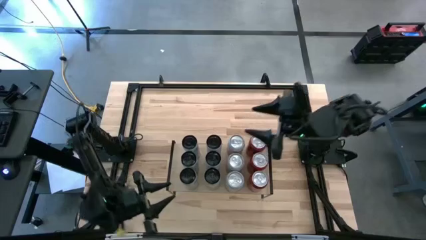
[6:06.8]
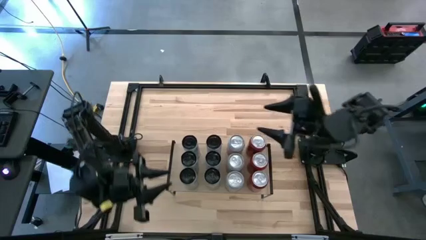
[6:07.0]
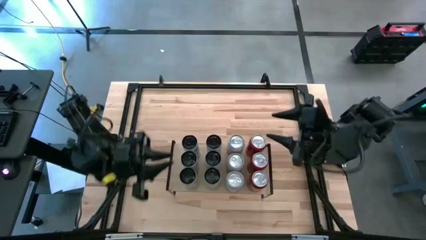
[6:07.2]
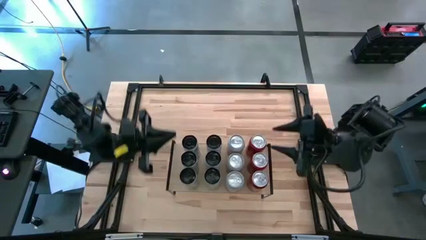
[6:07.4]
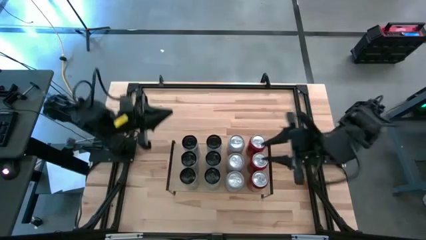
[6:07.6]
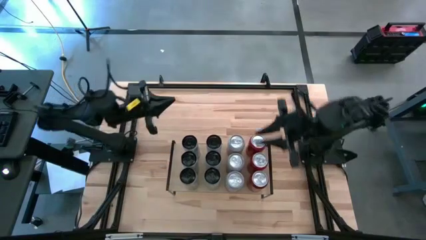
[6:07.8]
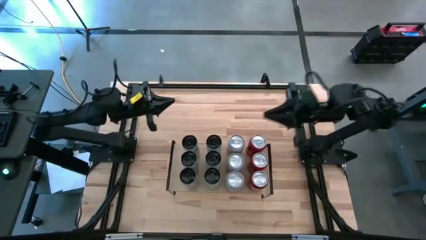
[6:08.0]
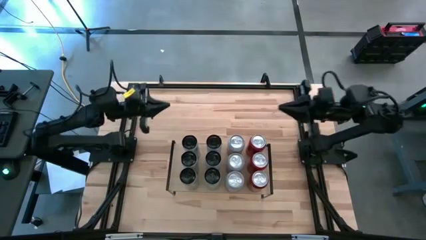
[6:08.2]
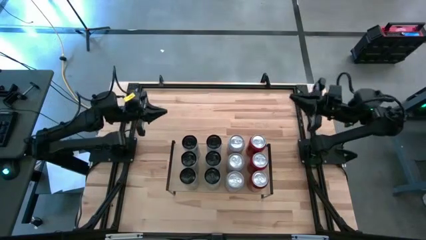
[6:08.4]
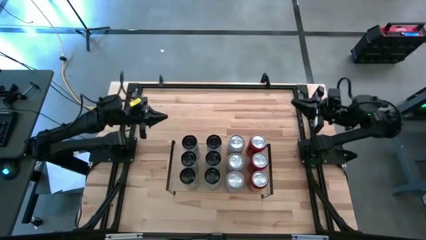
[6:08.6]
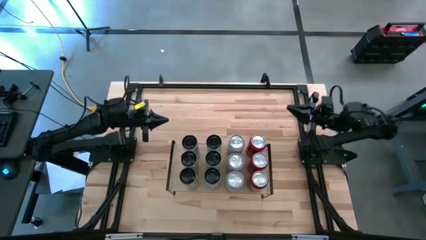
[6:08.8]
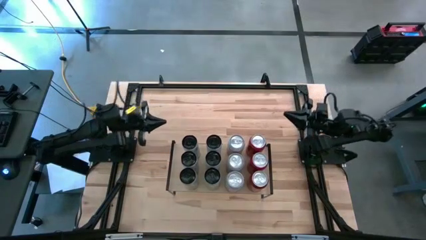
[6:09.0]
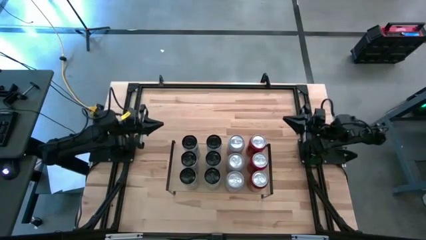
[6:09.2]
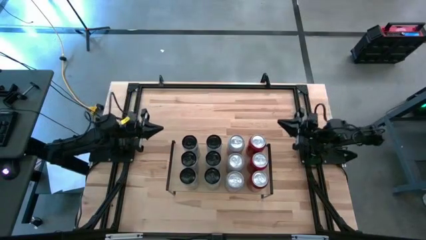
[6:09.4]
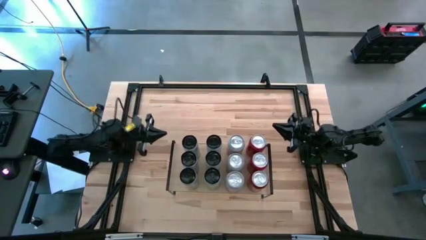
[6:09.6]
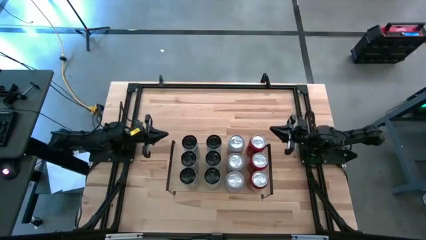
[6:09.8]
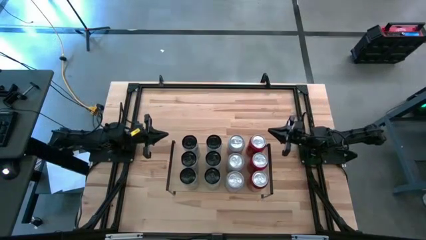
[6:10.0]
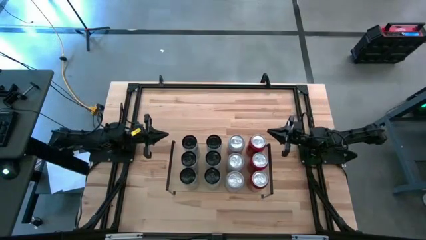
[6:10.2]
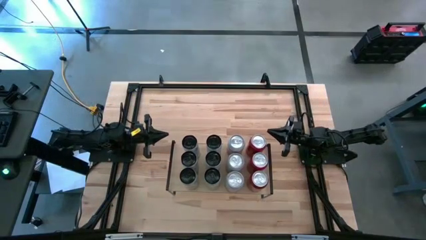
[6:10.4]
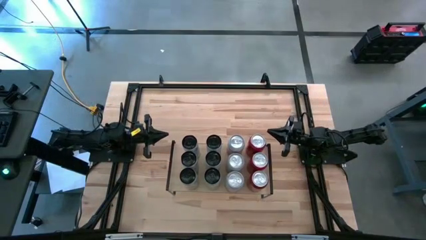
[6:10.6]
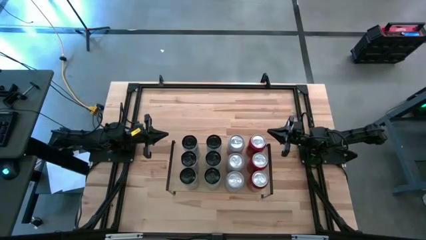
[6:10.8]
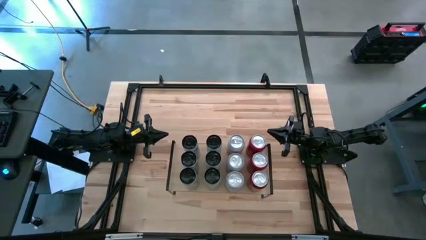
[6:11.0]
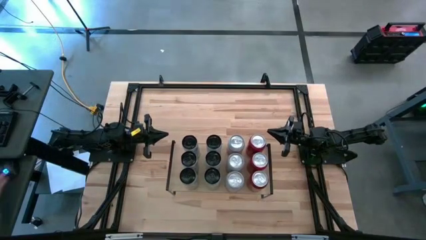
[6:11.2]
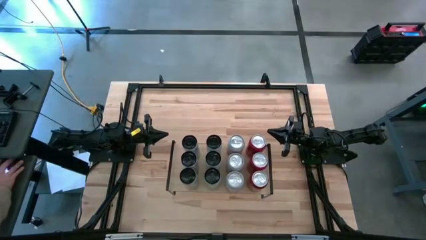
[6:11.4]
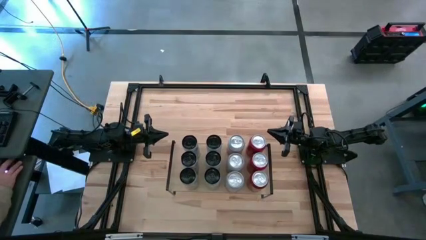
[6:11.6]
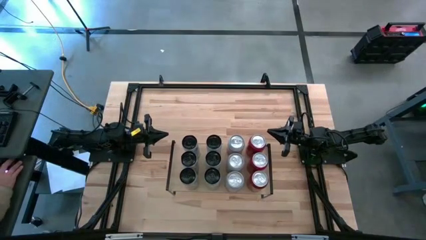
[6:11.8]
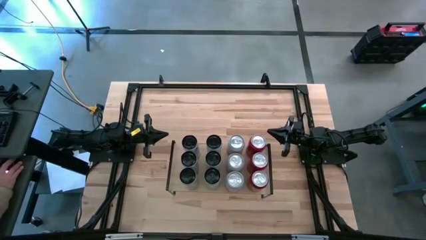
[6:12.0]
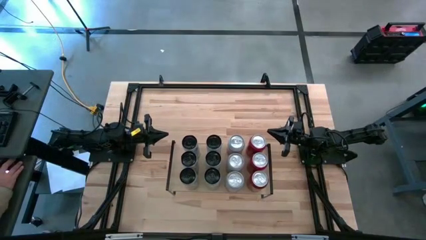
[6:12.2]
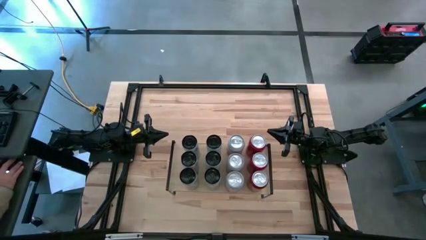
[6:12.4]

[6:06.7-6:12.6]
Task: Place canned beverage on shelf
Return to Home Position

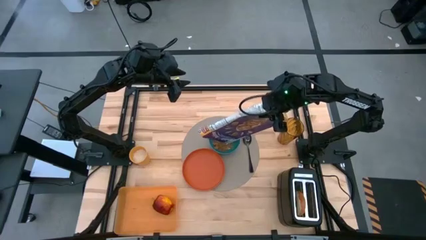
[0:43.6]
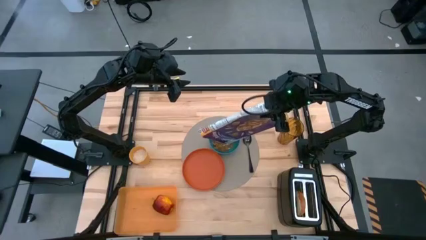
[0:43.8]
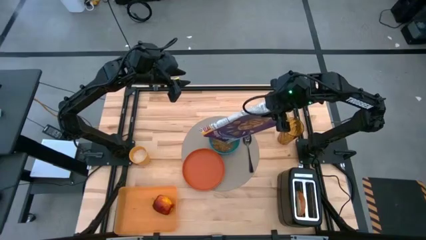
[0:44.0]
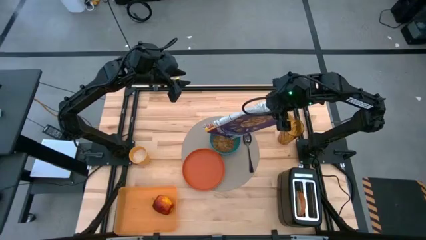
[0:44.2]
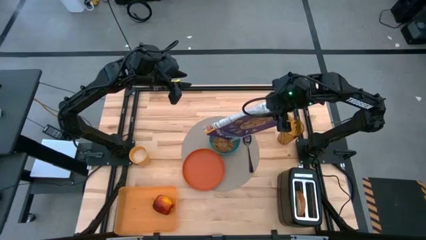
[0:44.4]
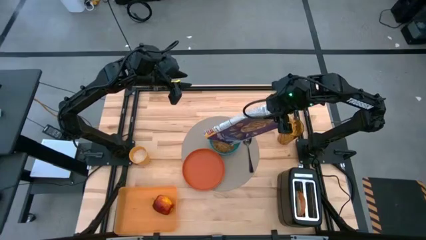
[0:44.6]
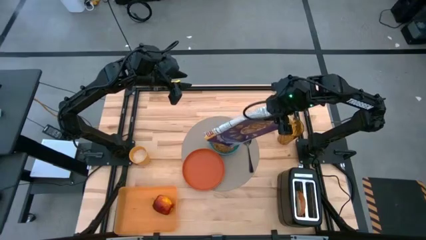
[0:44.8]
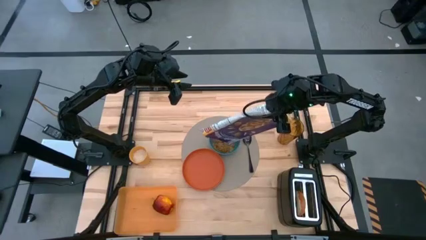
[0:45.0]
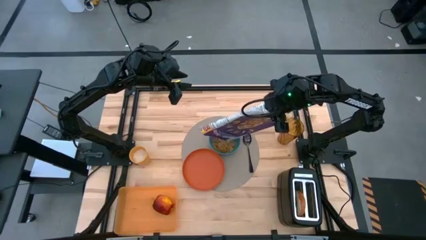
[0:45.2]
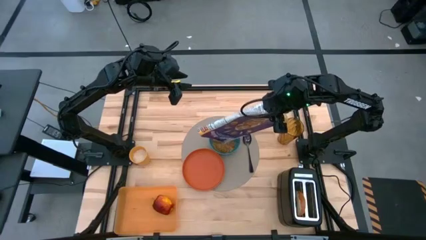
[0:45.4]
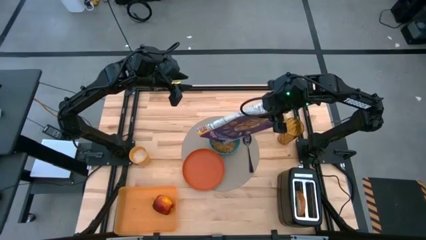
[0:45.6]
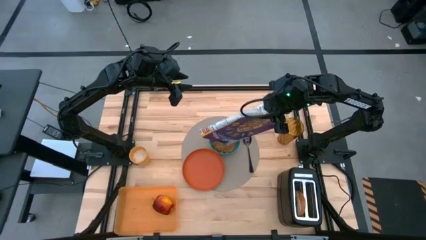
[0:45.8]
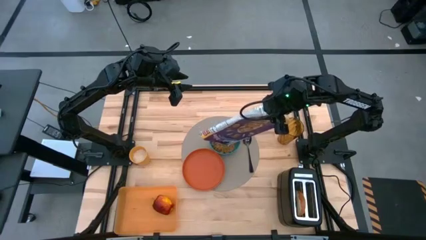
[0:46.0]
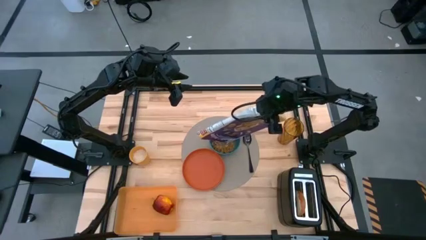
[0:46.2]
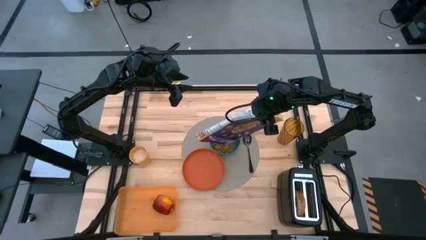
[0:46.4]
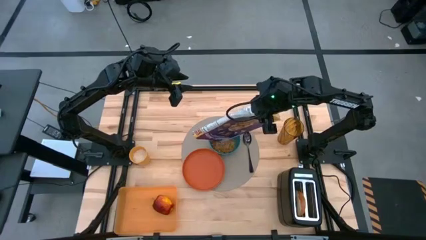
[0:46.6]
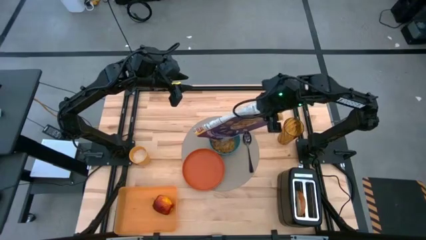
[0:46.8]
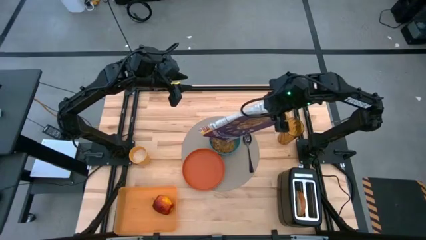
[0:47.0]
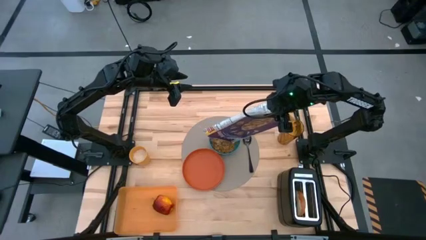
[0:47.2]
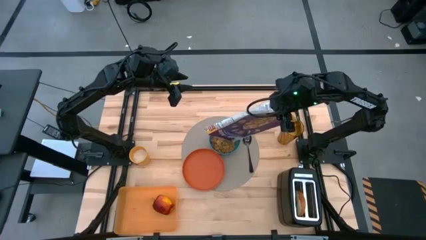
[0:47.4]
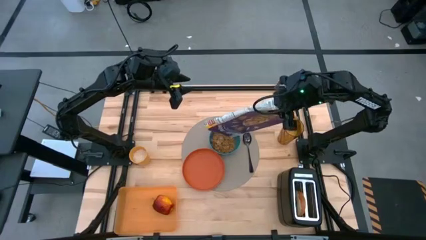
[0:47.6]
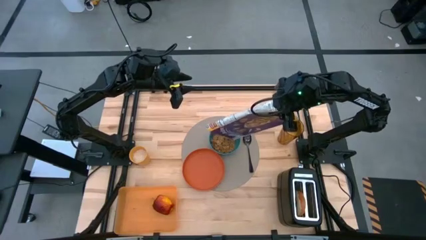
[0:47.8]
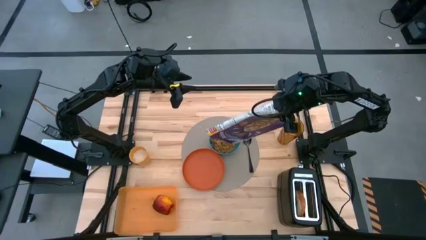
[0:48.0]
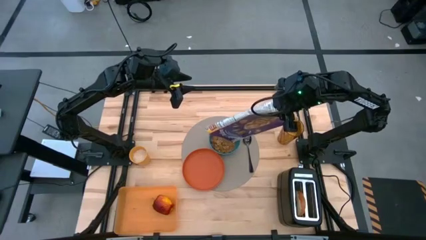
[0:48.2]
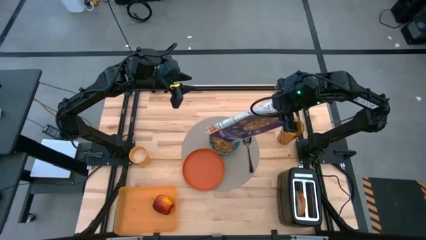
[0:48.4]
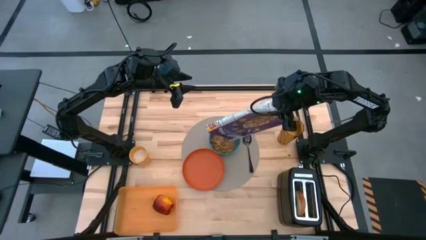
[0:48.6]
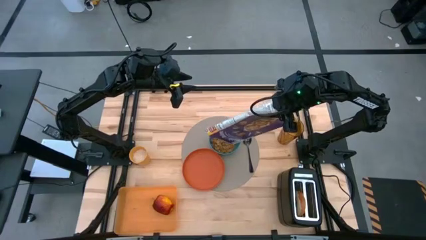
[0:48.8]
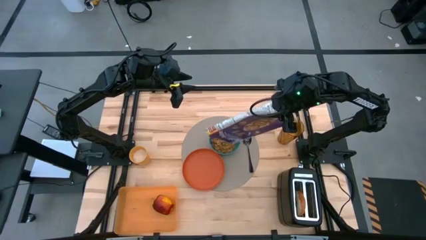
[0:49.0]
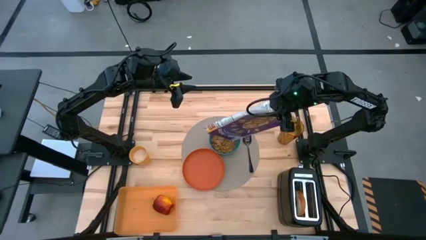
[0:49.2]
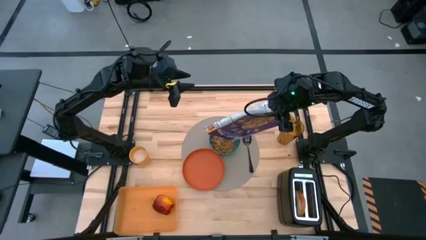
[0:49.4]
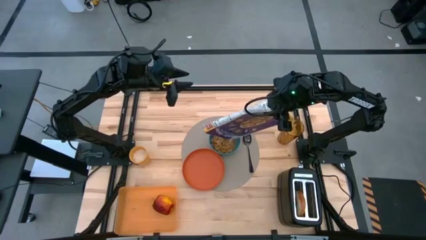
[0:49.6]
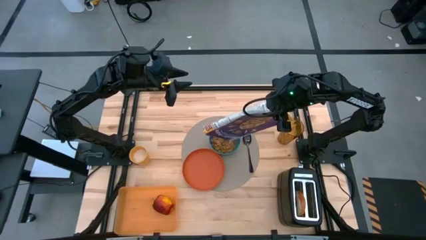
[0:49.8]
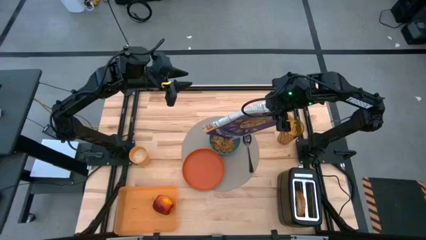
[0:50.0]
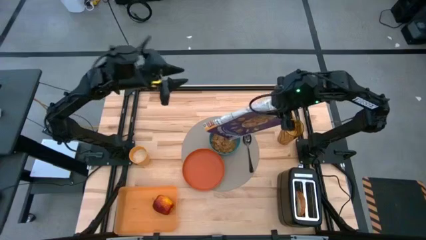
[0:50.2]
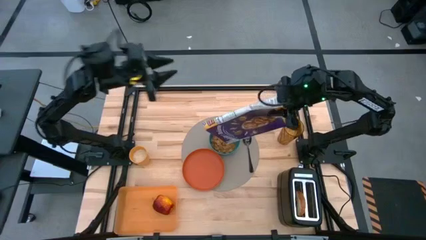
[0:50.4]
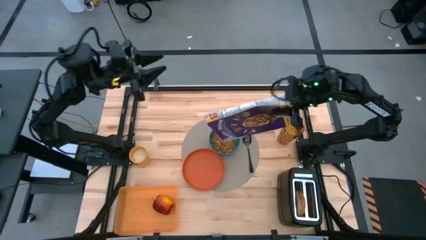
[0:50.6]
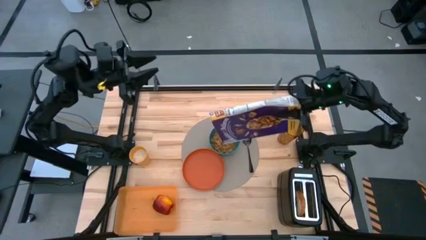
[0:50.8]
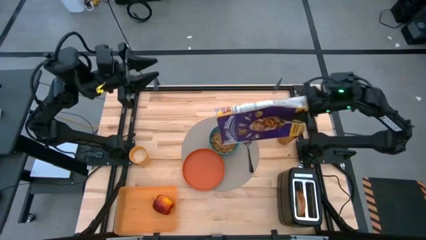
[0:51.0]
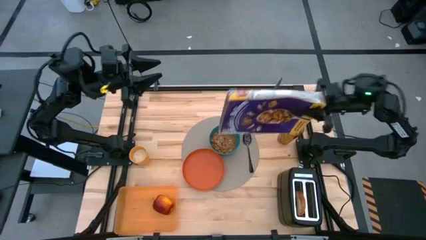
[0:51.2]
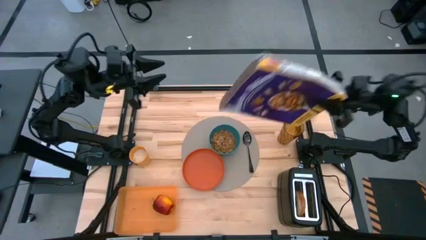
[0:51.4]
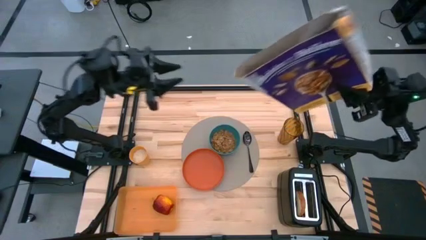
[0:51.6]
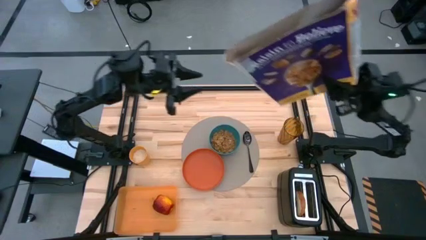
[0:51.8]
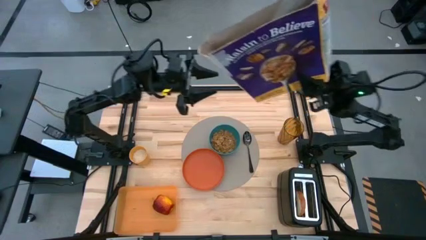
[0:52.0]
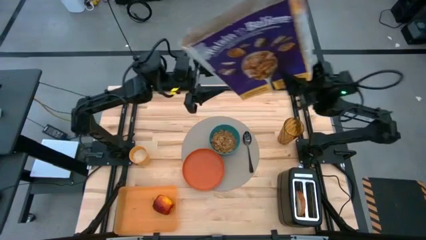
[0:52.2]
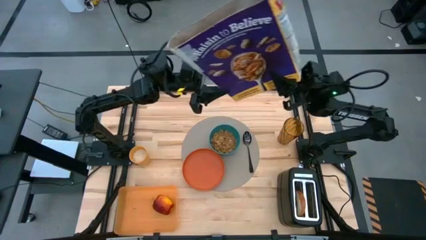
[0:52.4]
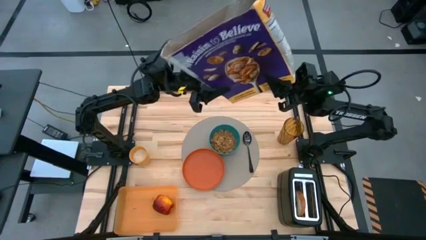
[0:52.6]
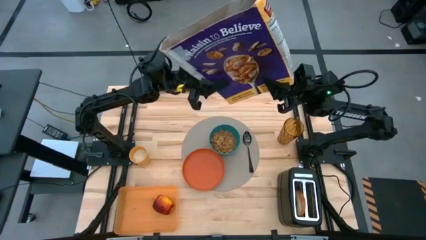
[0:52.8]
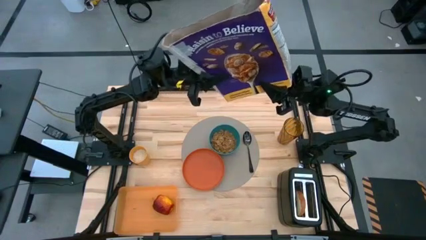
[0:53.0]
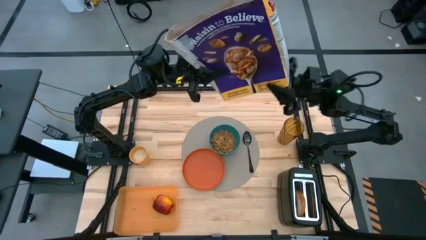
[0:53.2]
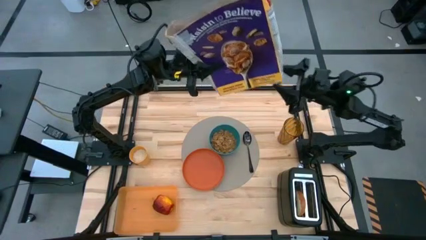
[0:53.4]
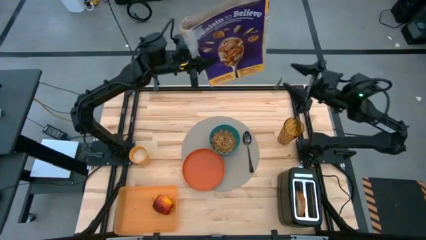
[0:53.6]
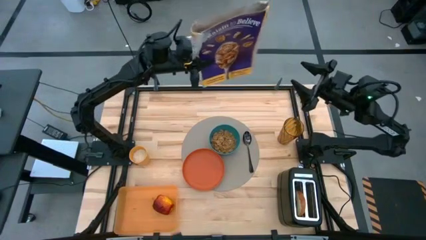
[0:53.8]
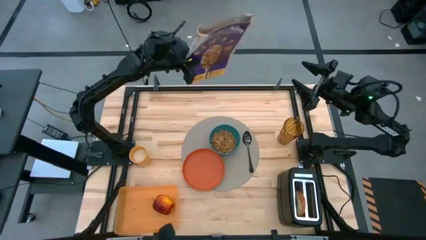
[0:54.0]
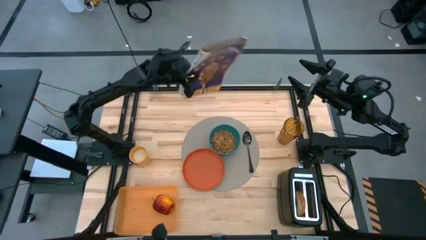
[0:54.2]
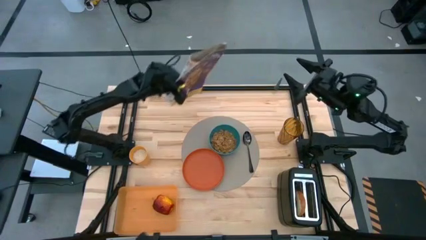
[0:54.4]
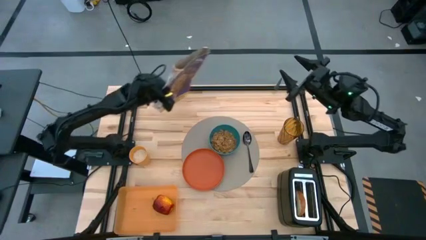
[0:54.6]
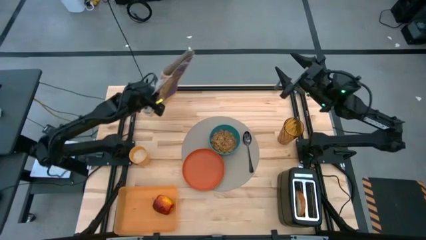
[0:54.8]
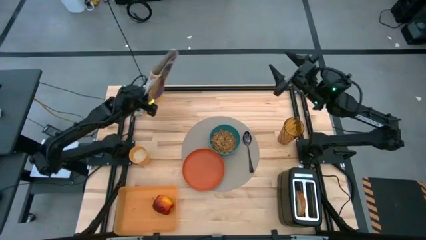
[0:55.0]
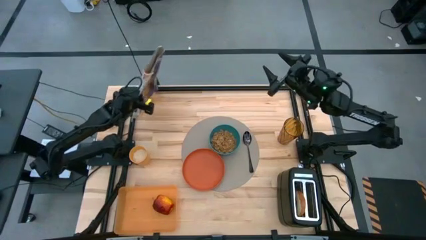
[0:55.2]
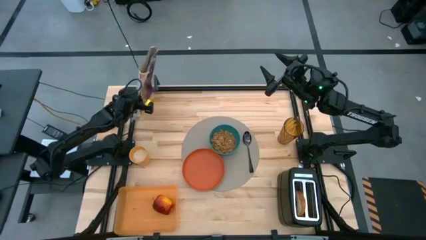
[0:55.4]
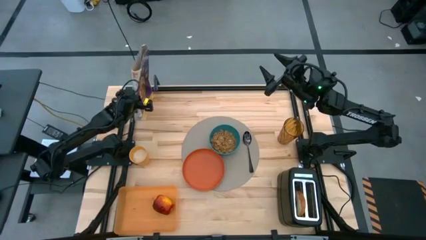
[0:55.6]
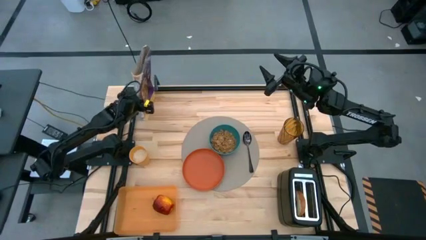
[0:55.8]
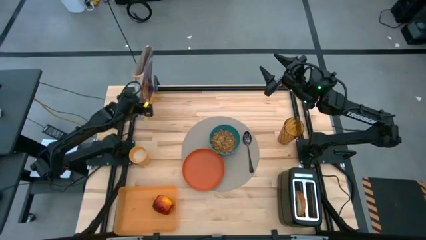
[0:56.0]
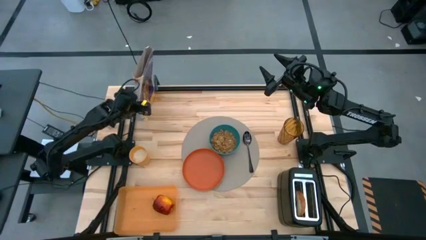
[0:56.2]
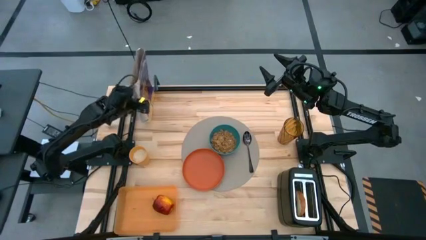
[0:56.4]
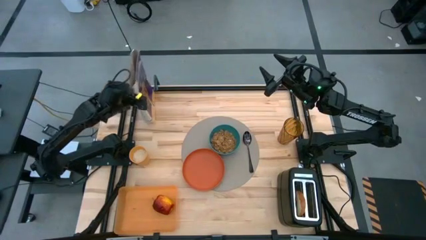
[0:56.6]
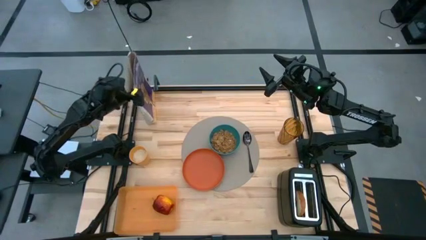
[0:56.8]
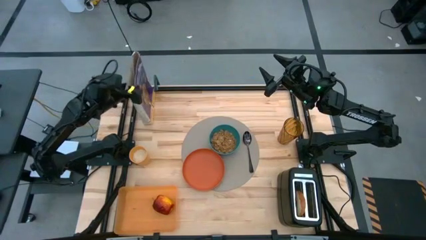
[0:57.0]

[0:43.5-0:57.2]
Task: Arrange a breakfast setting
Pour the cereal from the cereal box into the blue bowl
